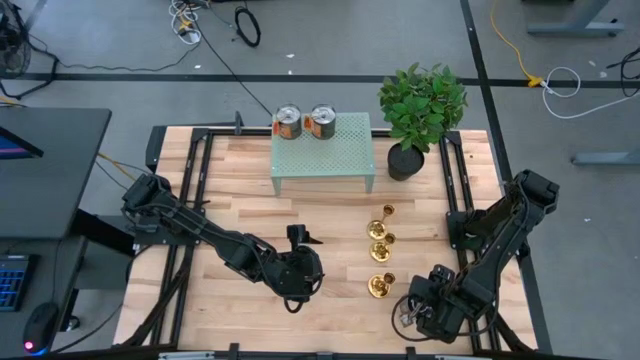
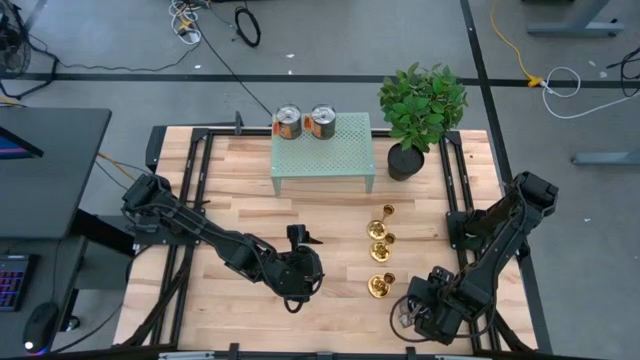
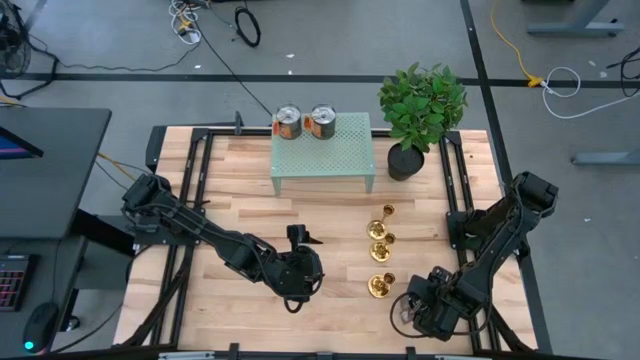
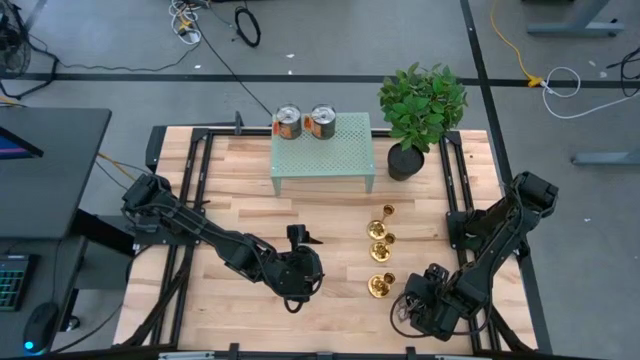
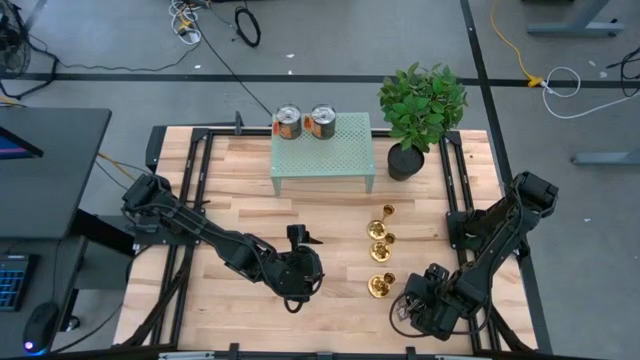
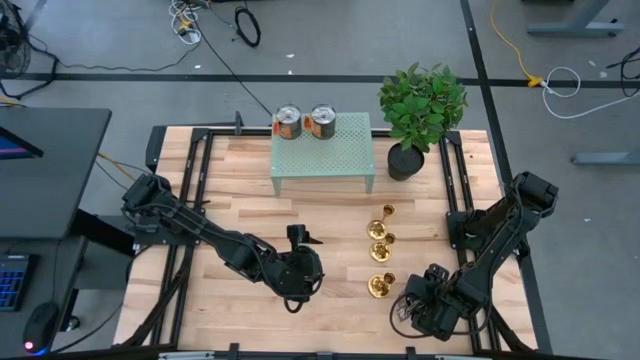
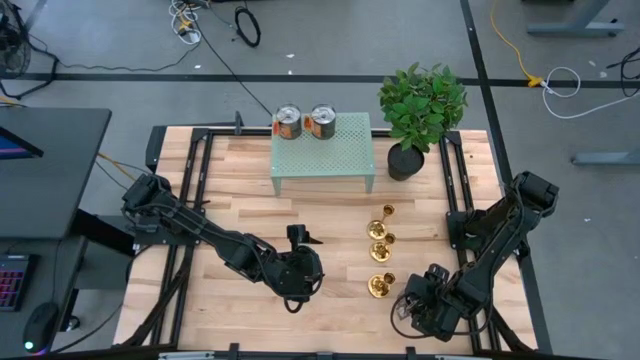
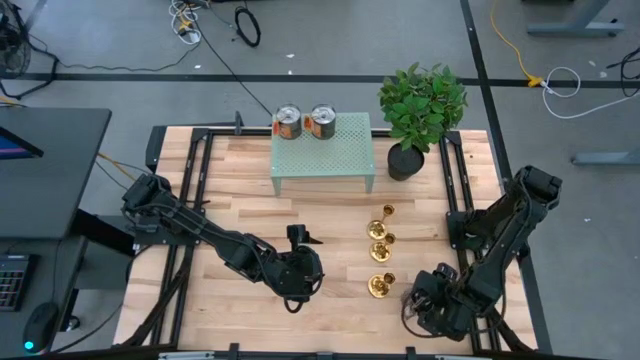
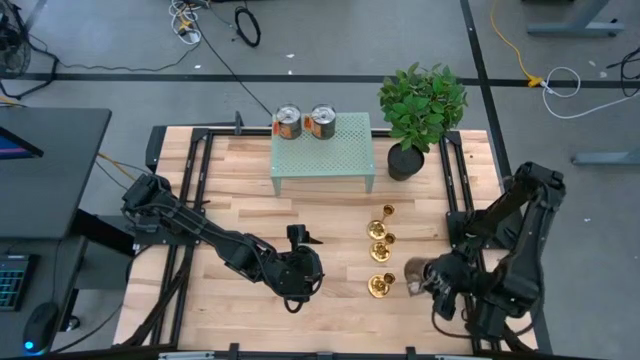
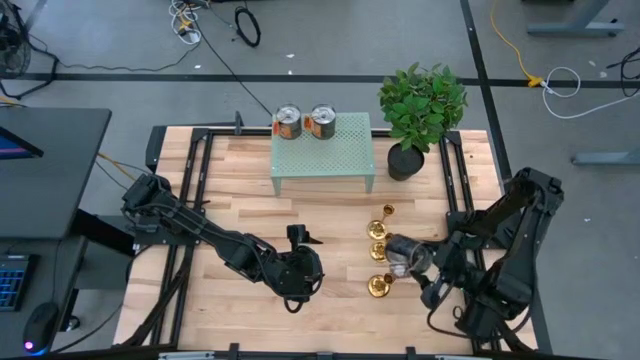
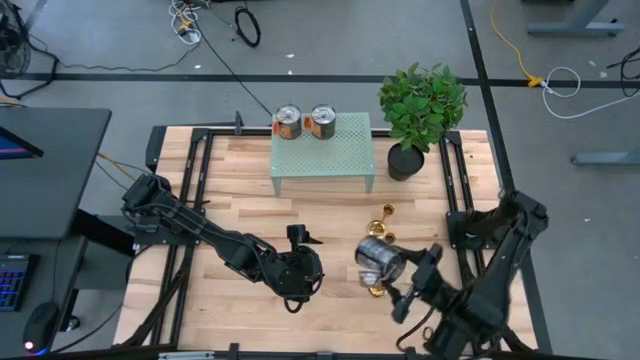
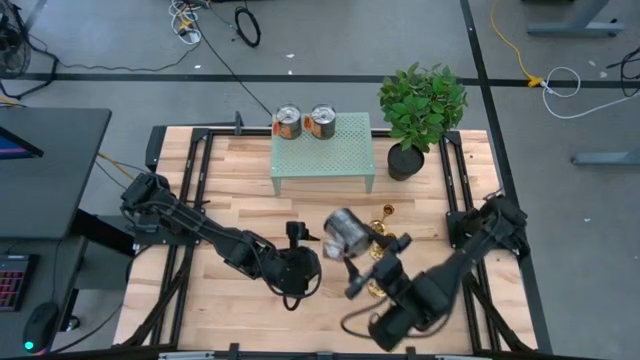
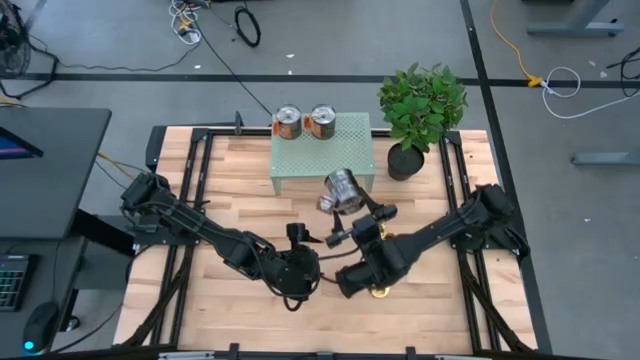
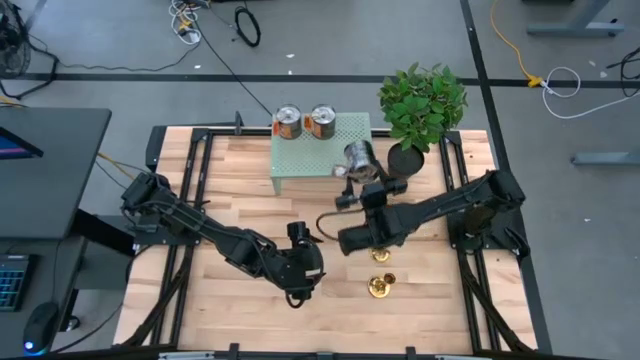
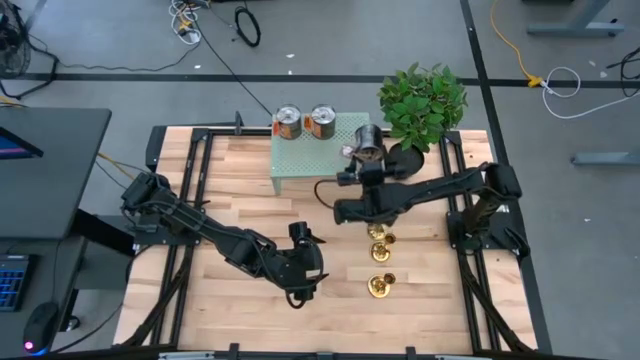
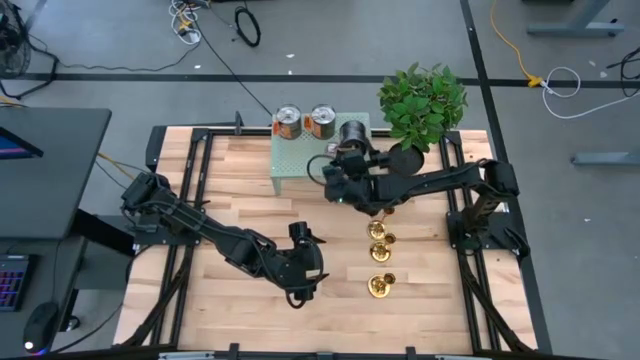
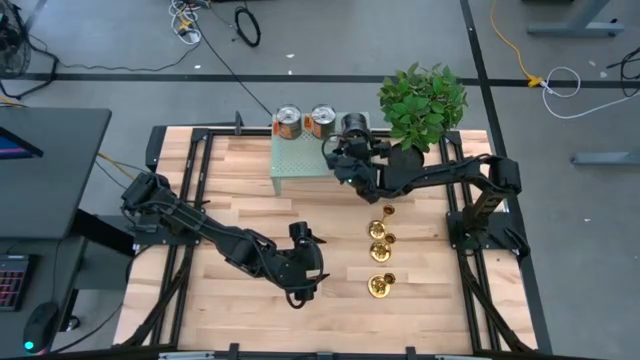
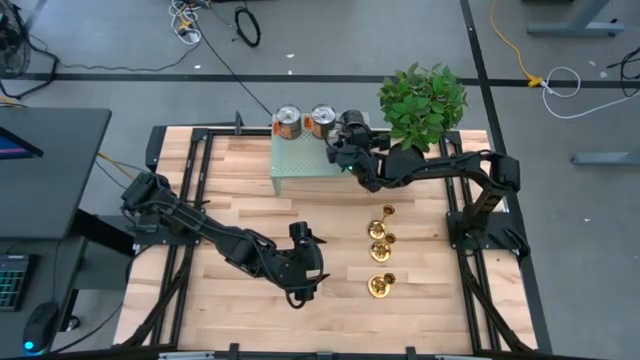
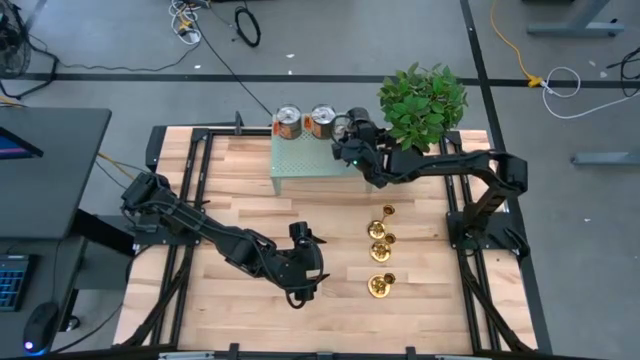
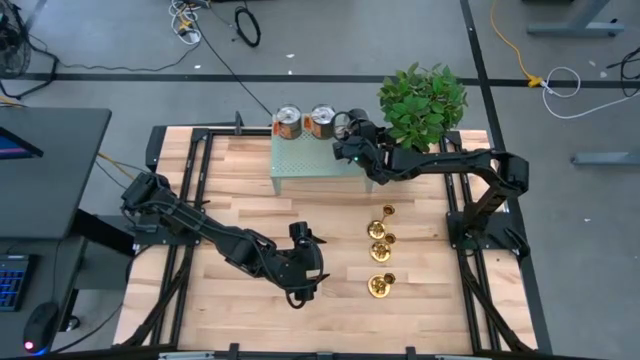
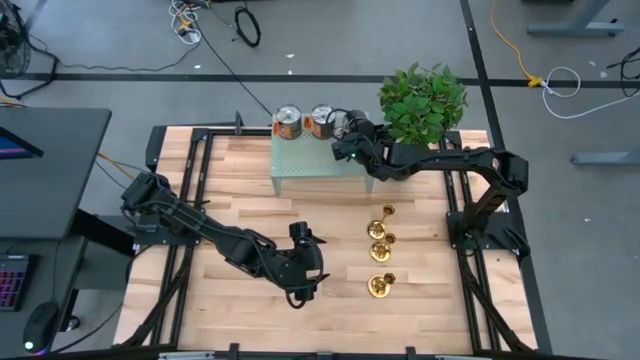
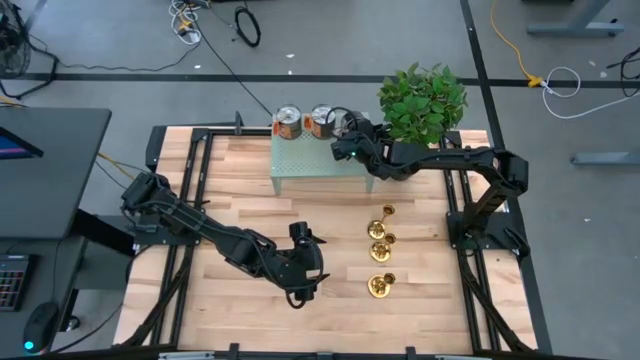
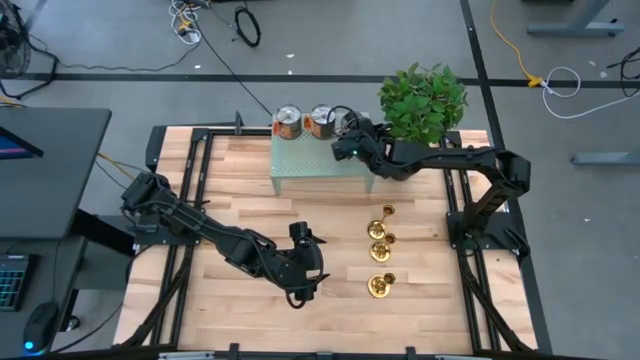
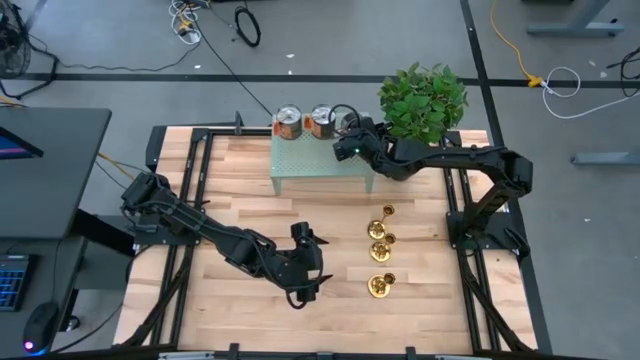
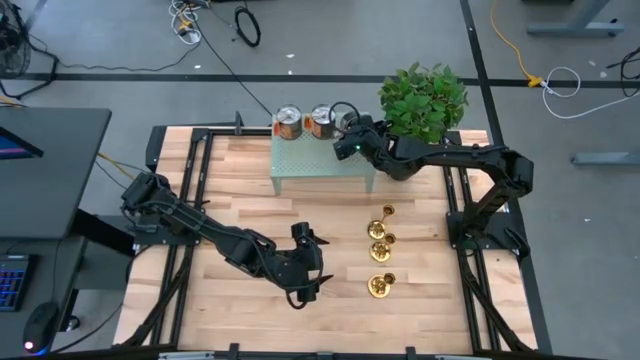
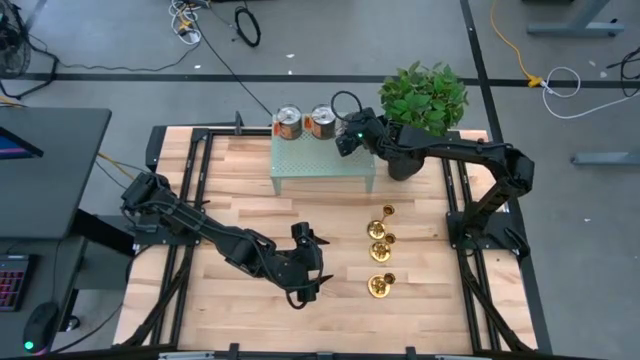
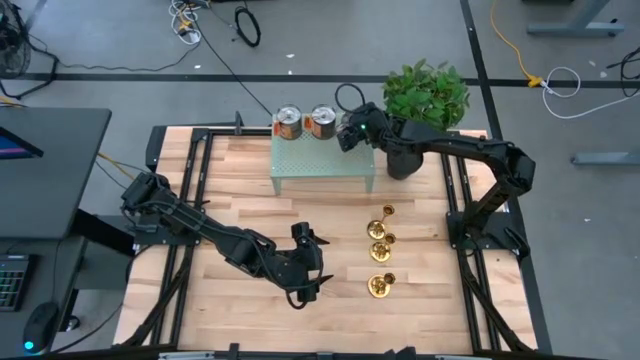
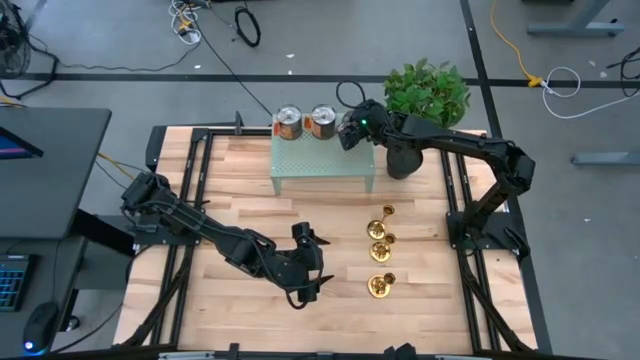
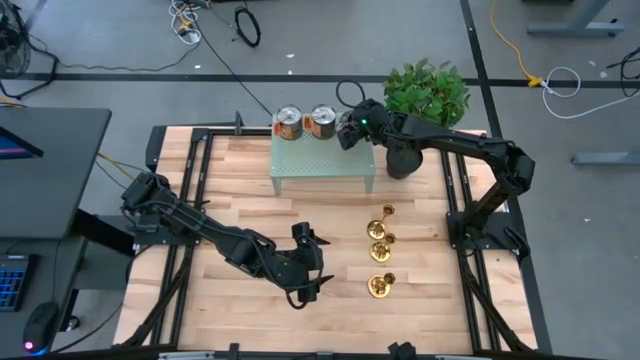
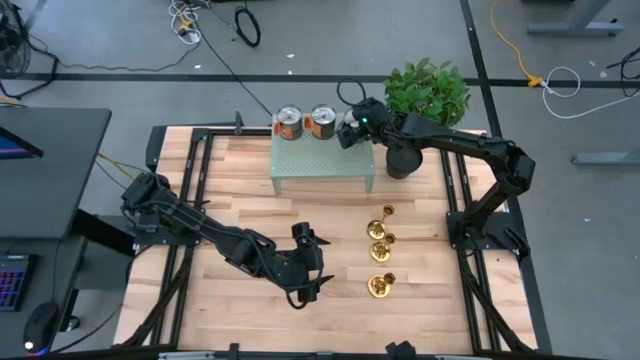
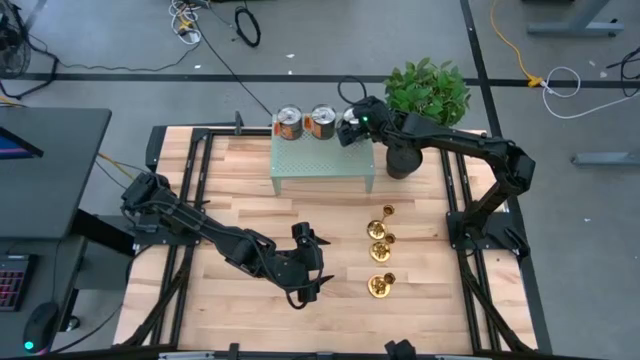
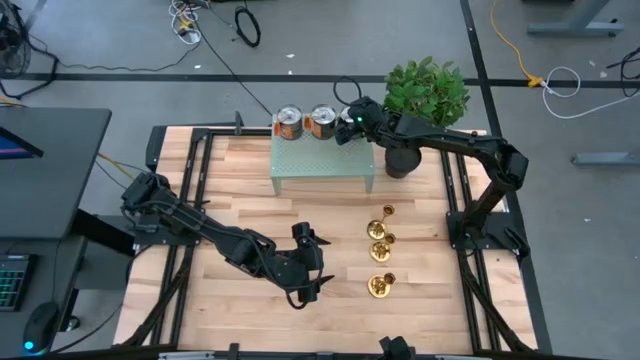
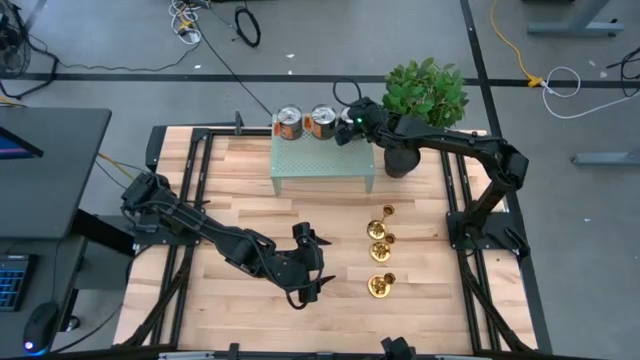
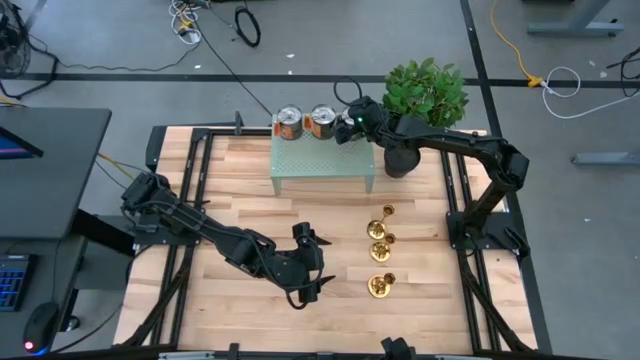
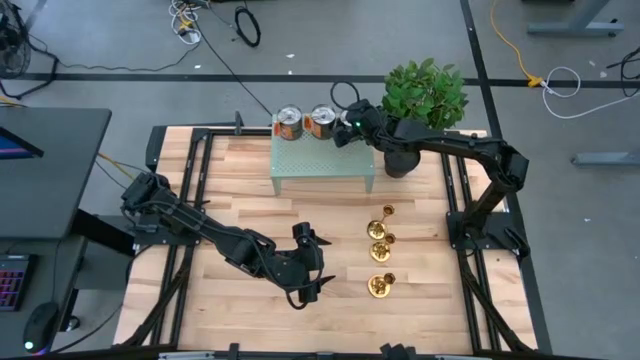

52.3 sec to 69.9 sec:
Task: Pick & Place candle stick holders
Put the silver scented candle on the shelf aligned with the other silver scented candles

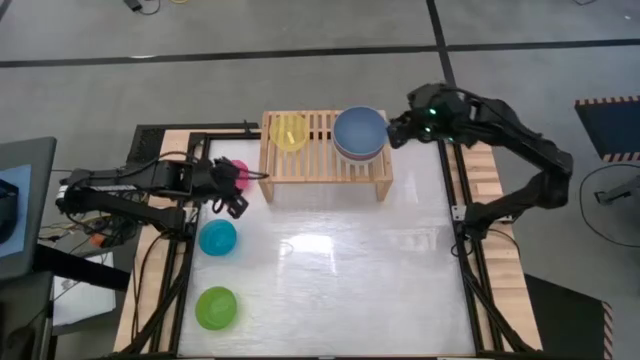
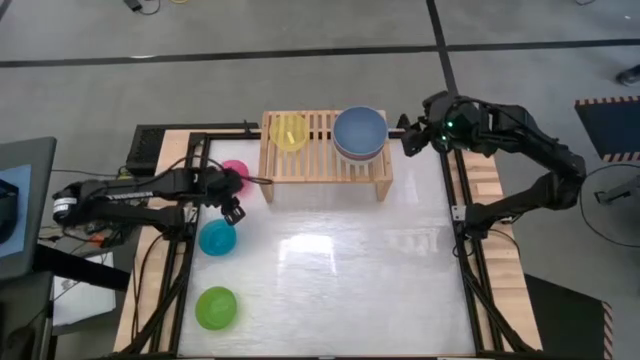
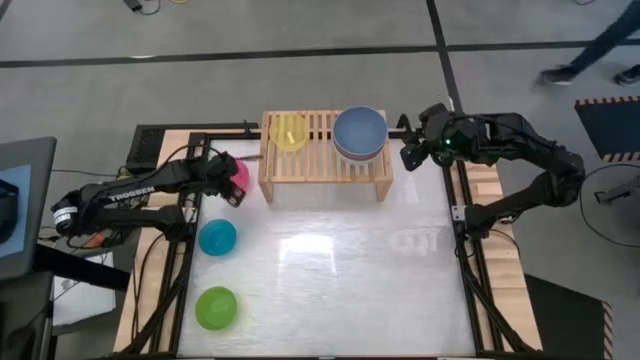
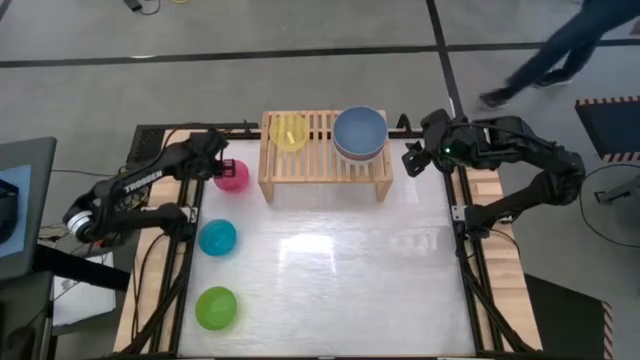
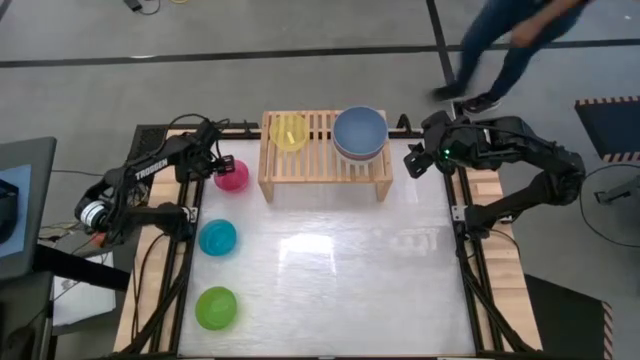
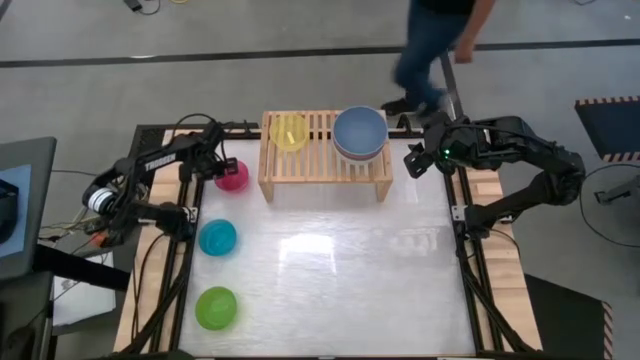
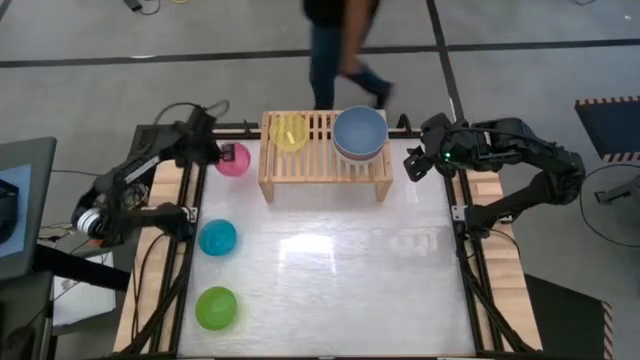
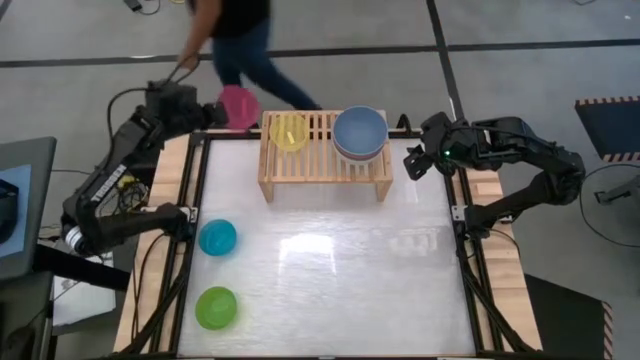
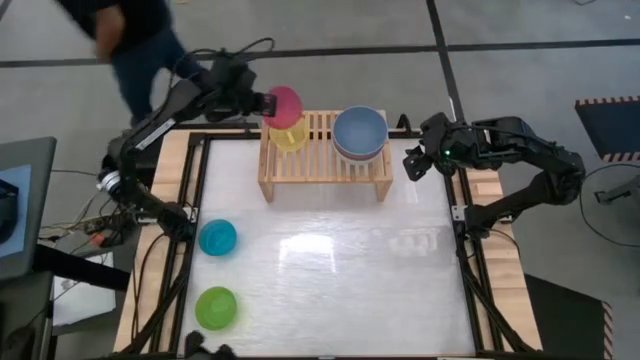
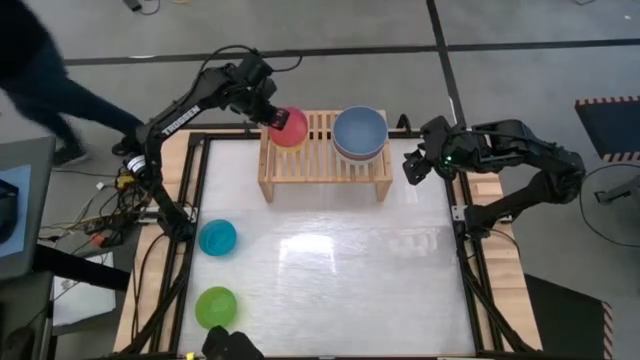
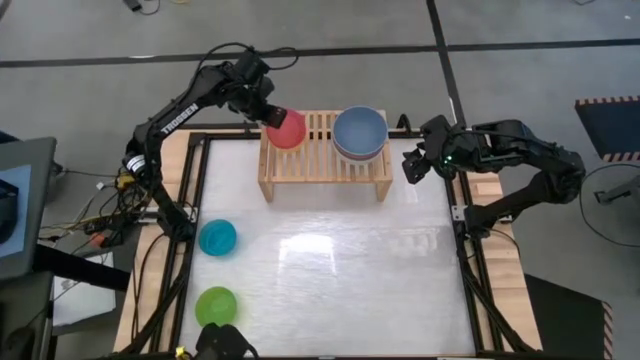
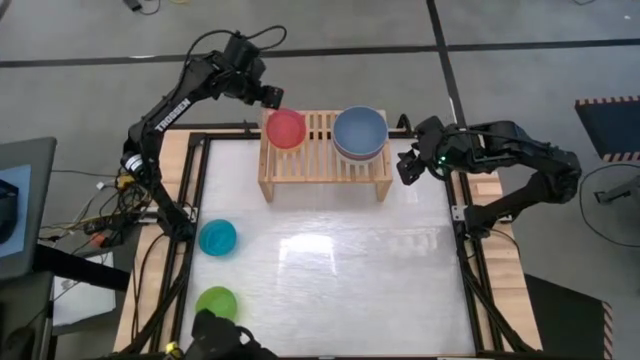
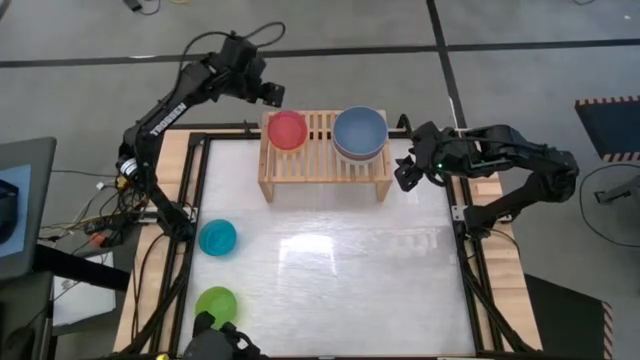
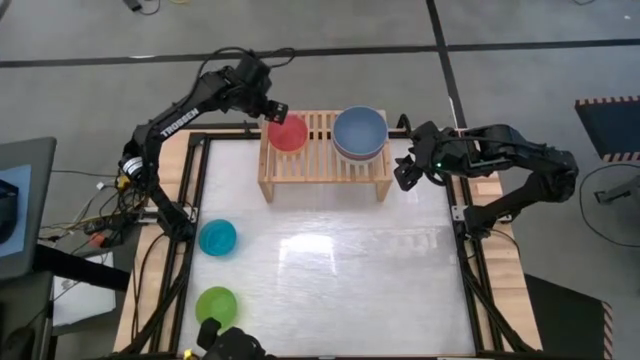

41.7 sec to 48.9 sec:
Task: Place and stack bowls onto a shelf
Stack the pink bowl on top of the yellow bowl on the shelf
